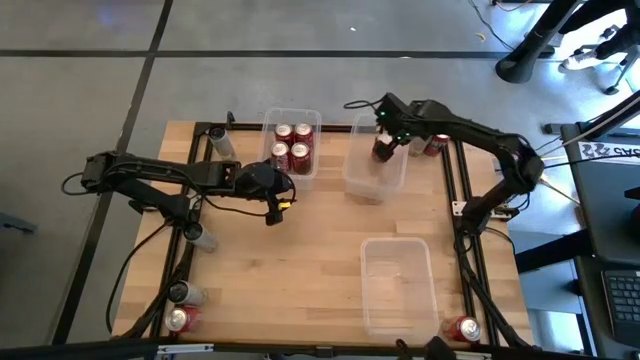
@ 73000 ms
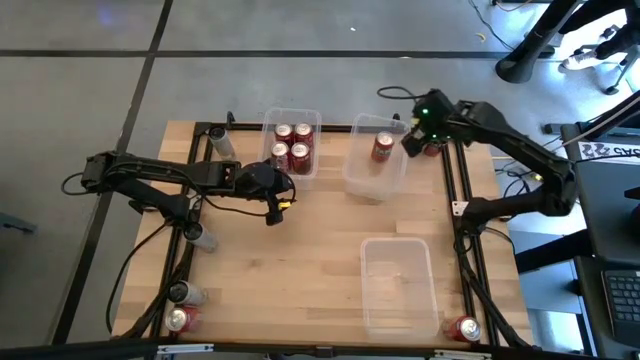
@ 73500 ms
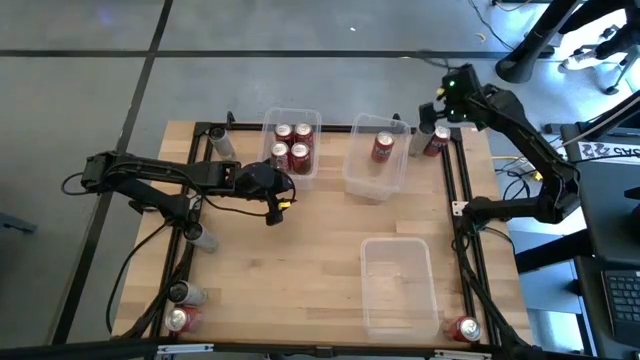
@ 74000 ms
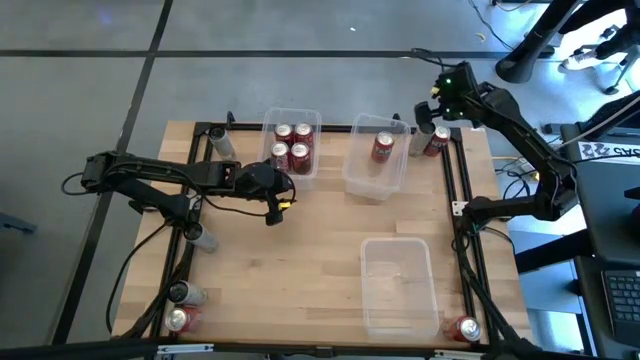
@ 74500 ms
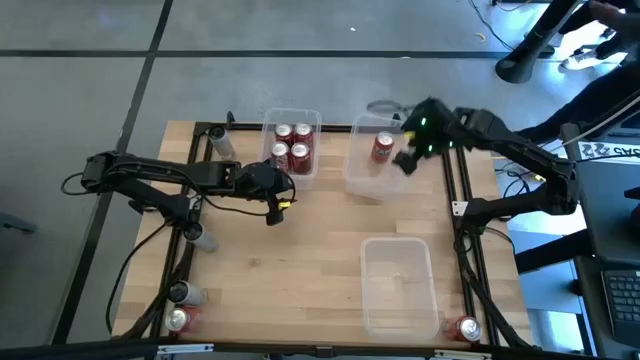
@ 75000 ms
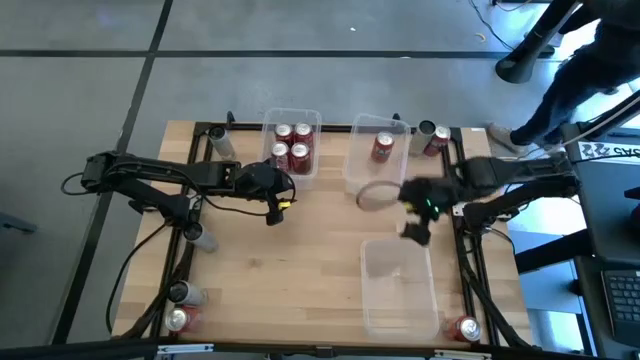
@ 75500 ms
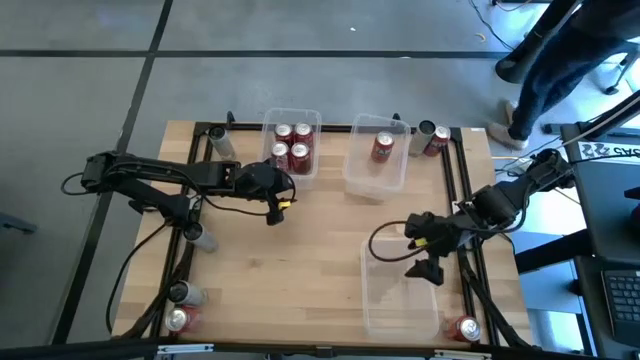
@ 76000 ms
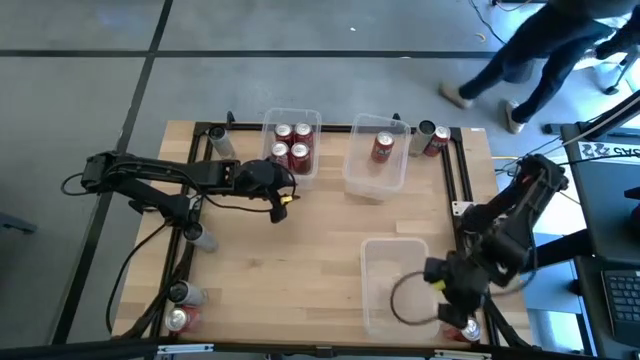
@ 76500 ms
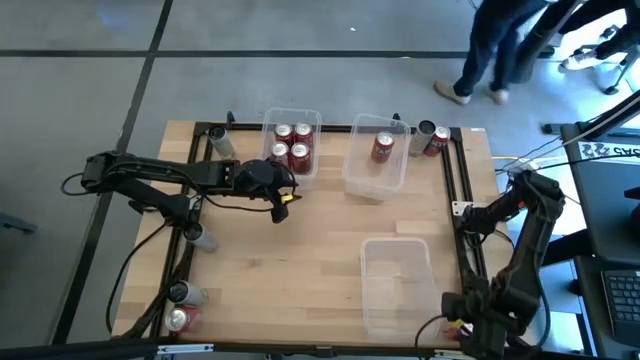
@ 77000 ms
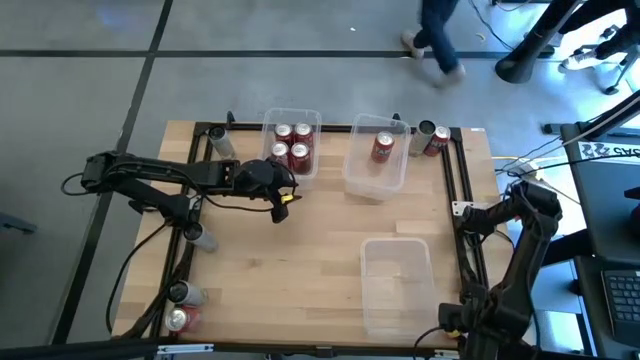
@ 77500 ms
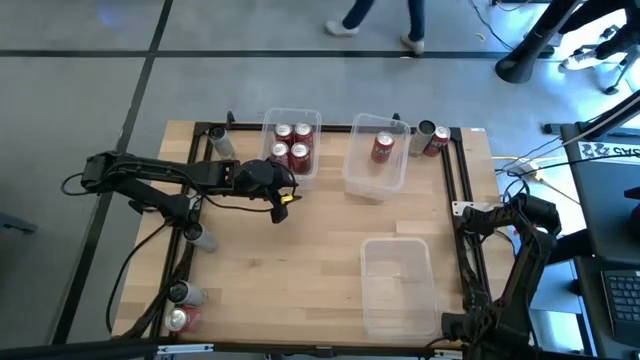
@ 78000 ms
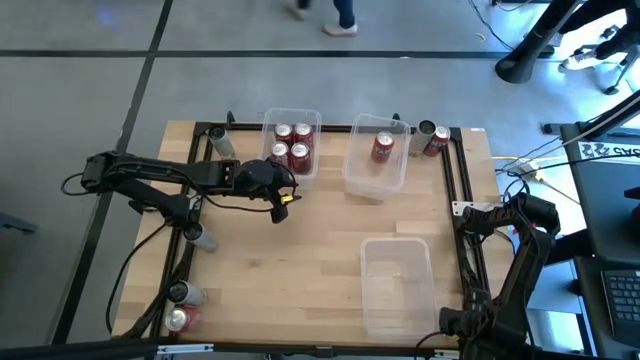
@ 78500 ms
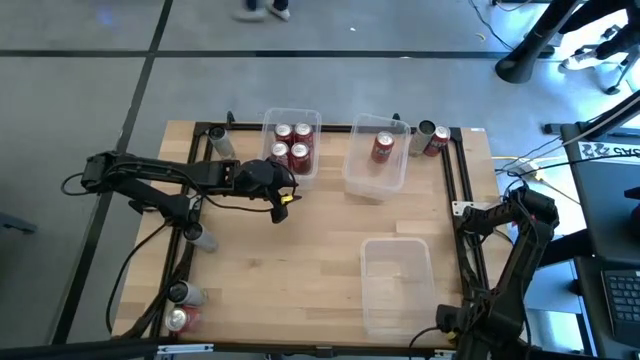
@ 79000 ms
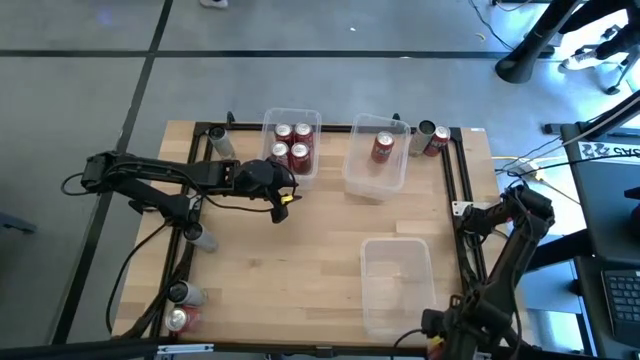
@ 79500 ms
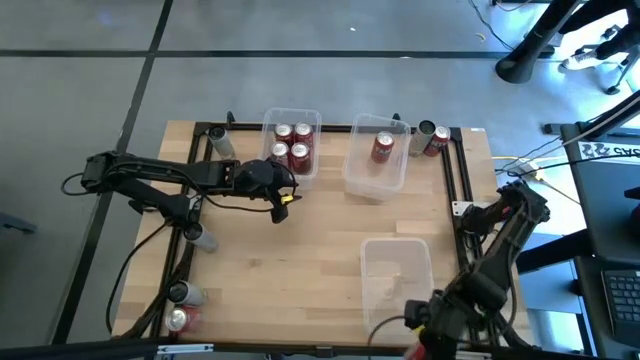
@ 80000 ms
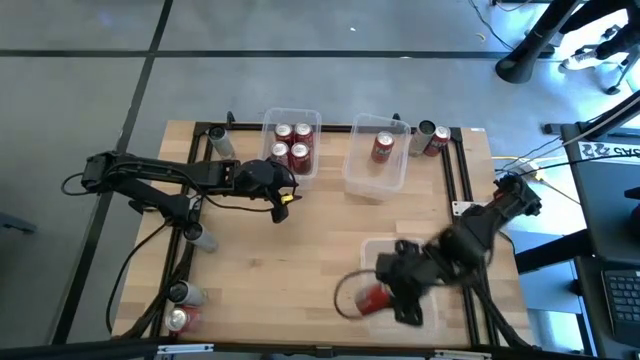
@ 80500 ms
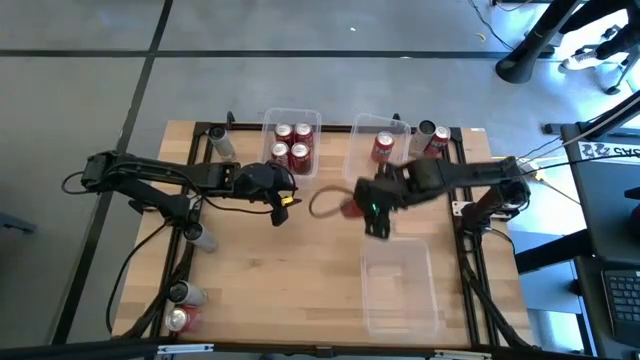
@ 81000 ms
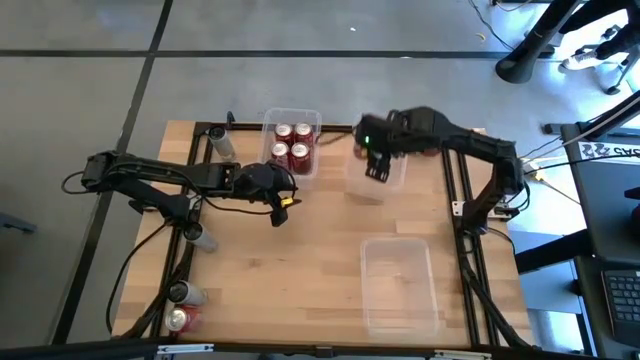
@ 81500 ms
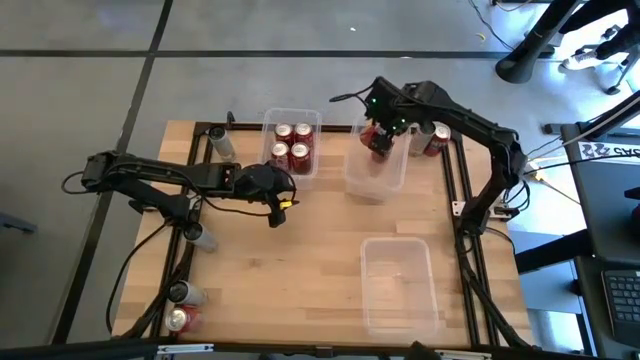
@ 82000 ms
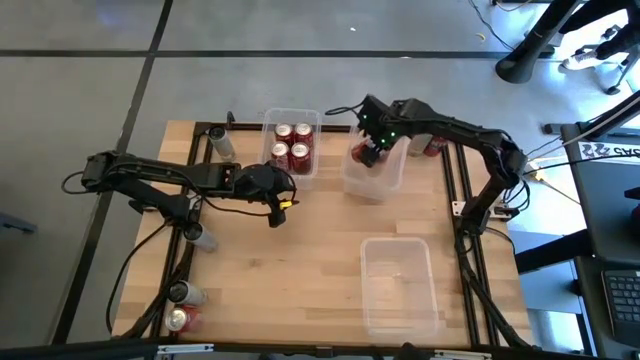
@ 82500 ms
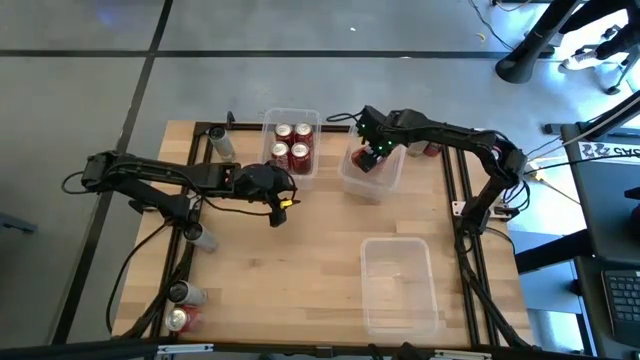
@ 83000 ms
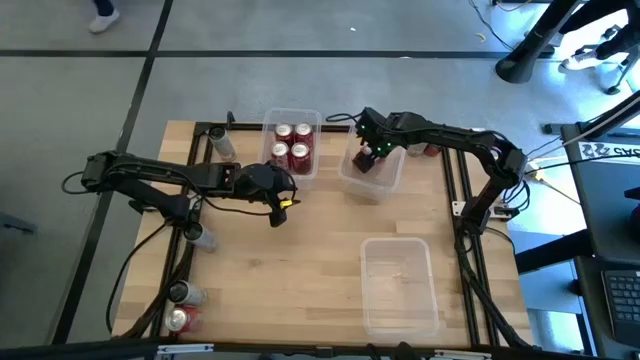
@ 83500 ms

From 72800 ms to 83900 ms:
Task: Sort soda cans
Put the bottom right orange soda can into the top right transparent bin aligned with the other orange soda can

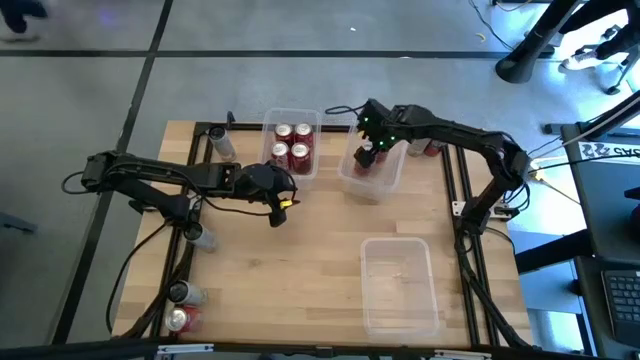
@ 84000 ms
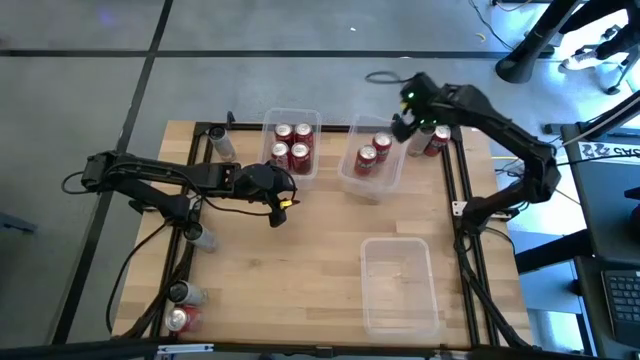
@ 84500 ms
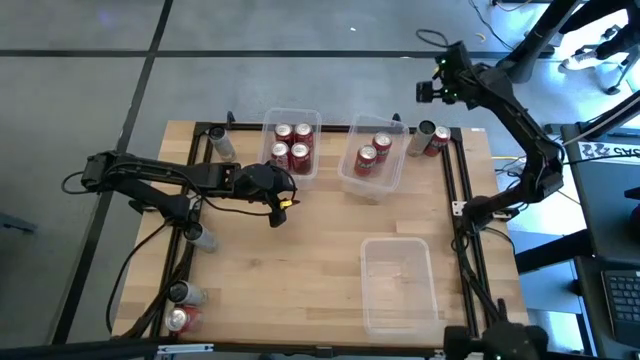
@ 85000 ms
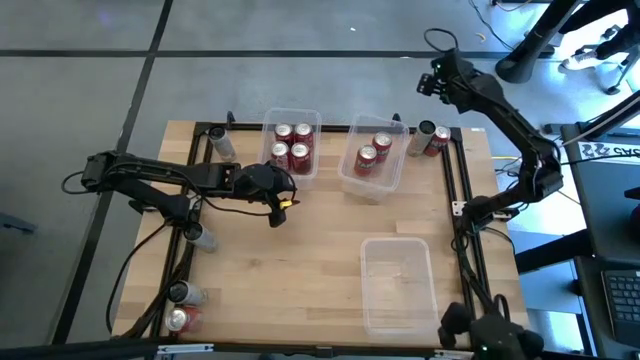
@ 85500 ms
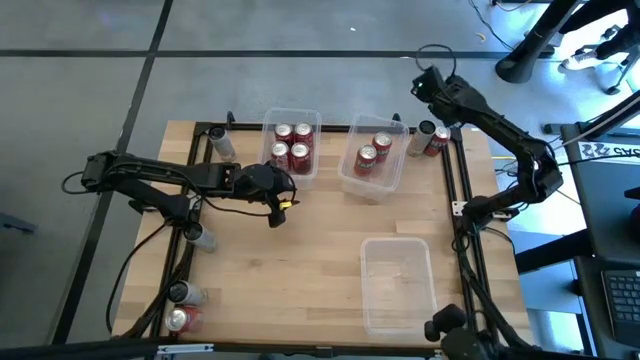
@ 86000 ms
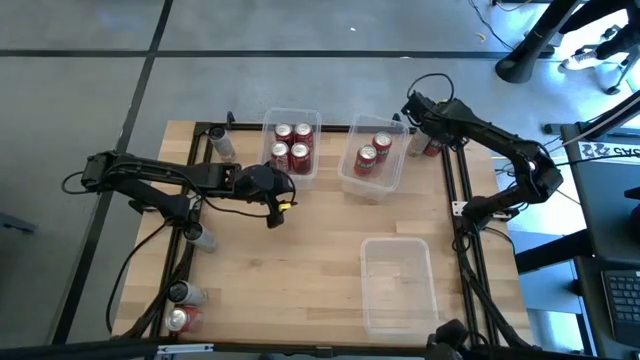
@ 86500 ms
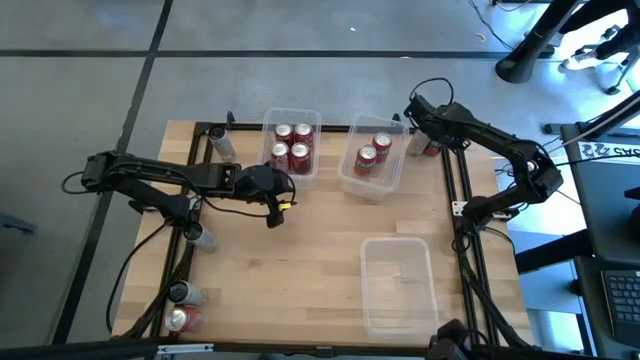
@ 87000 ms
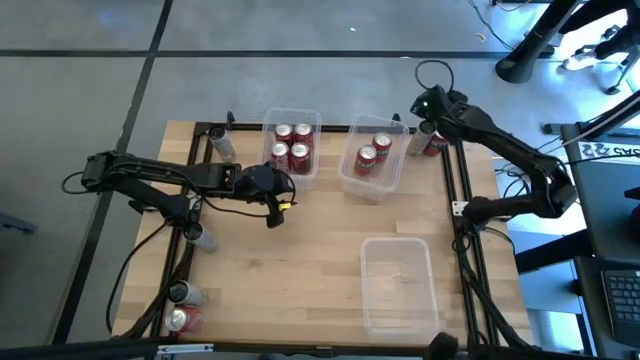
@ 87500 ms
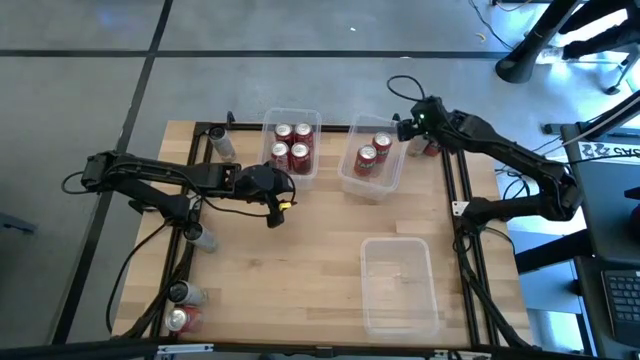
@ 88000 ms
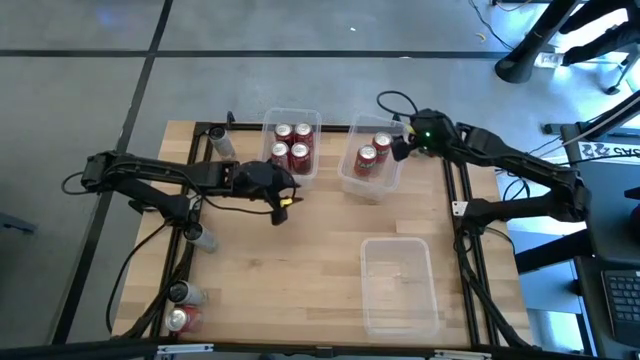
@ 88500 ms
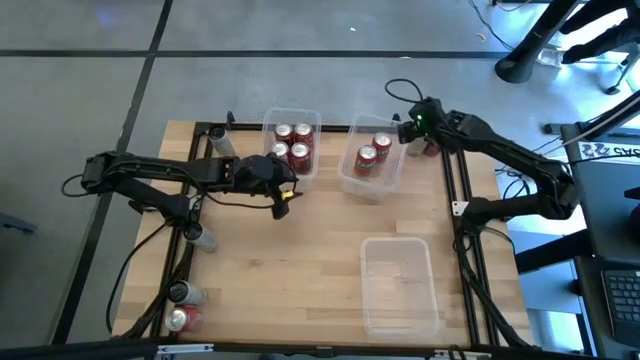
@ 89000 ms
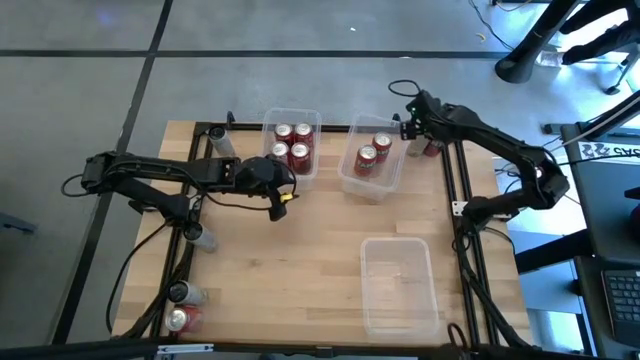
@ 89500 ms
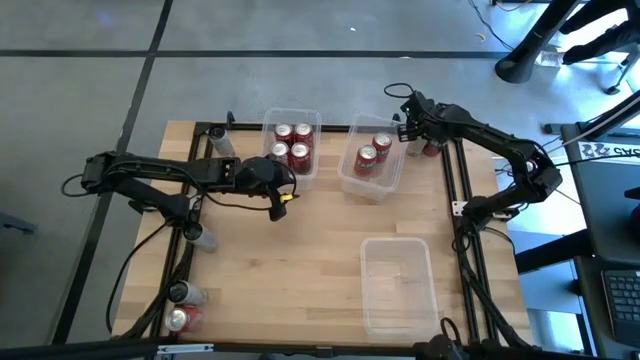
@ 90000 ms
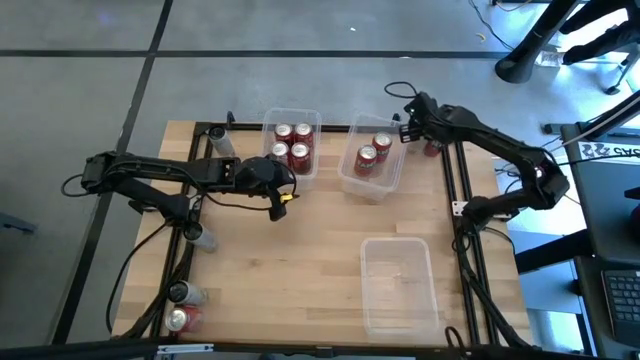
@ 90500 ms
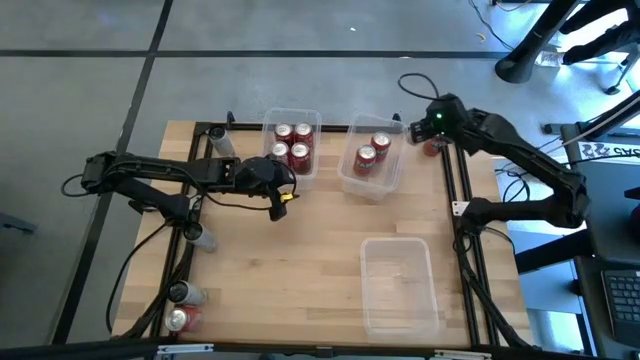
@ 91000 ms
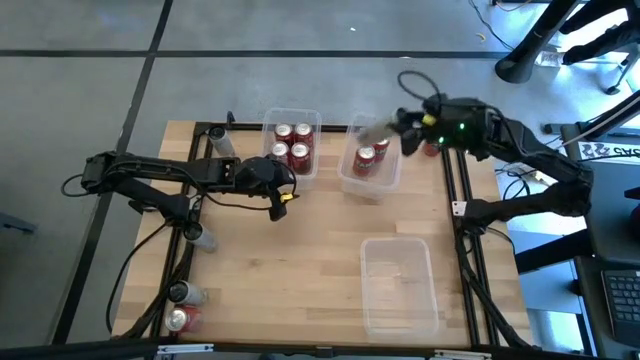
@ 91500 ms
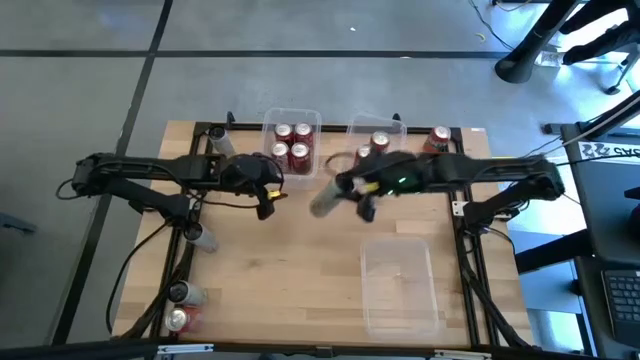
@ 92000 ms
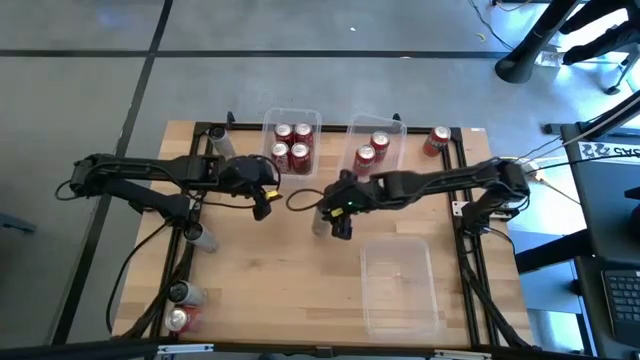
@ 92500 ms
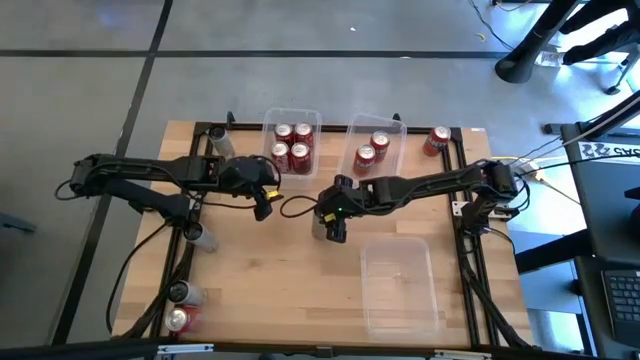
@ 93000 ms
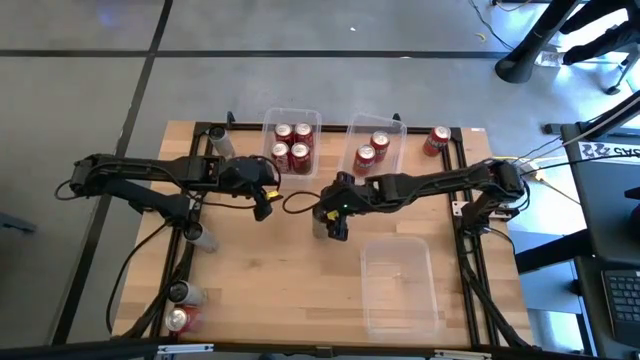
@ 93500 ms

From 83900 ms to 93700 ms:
Move the top right white soda can to the center of the table
